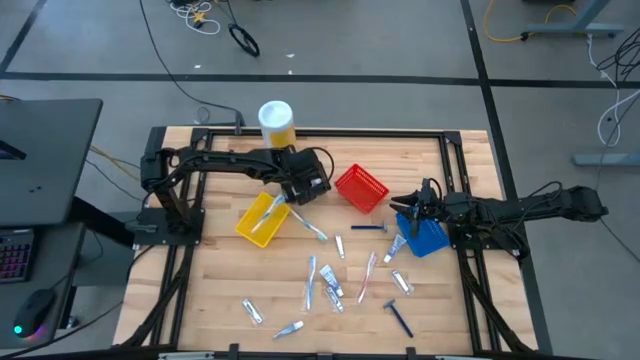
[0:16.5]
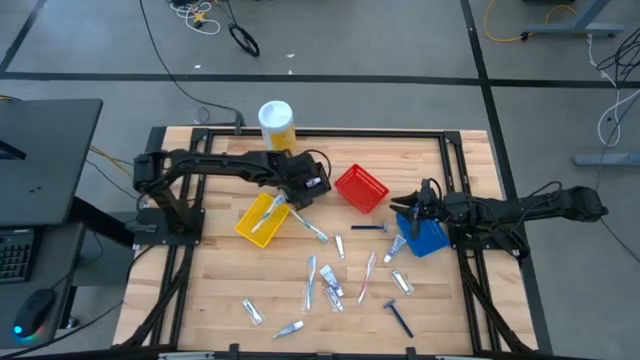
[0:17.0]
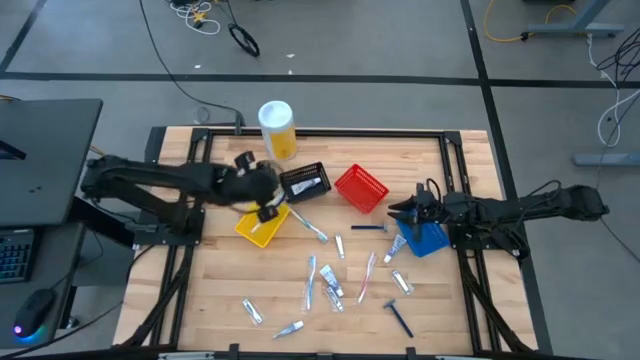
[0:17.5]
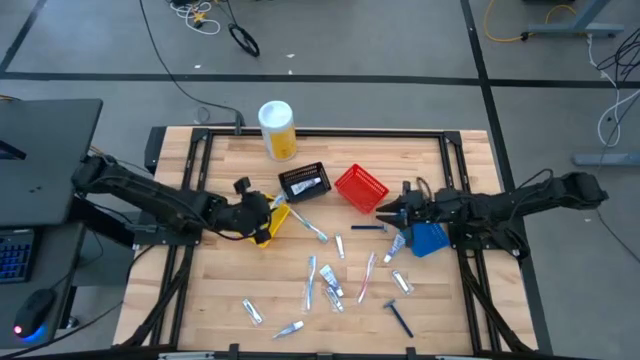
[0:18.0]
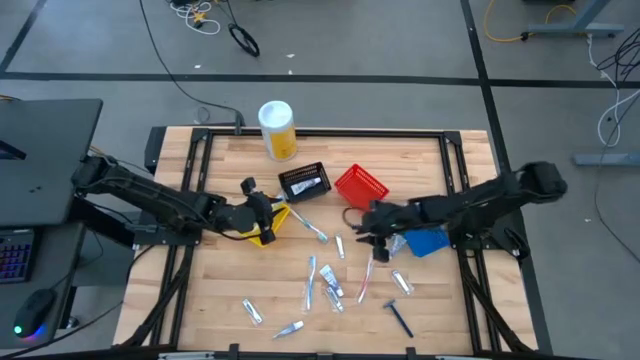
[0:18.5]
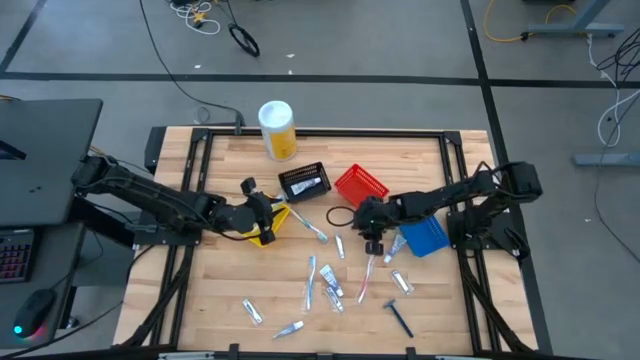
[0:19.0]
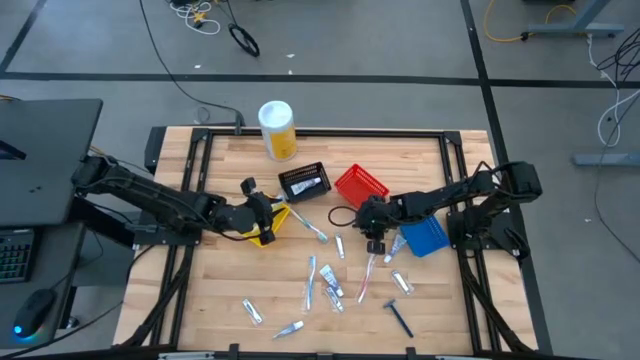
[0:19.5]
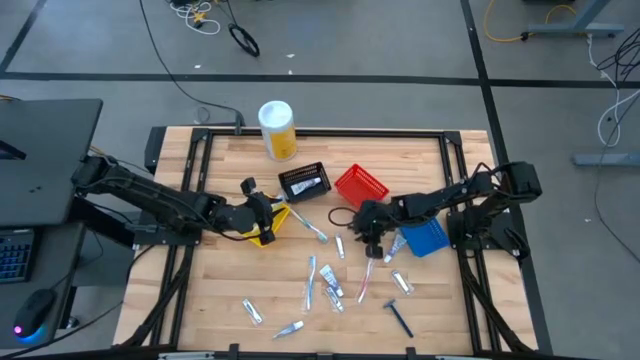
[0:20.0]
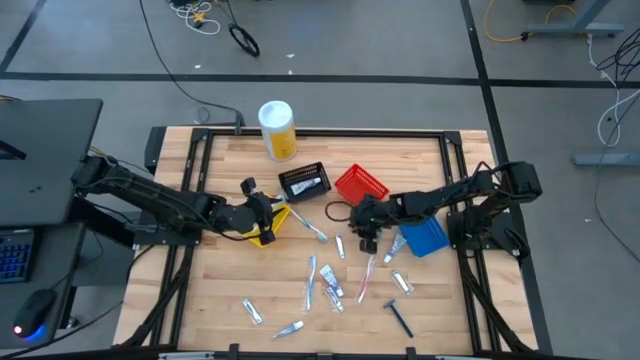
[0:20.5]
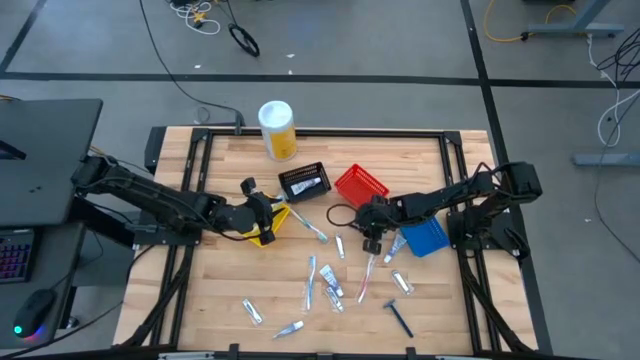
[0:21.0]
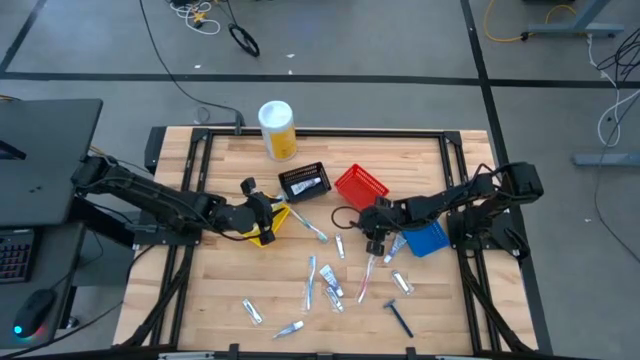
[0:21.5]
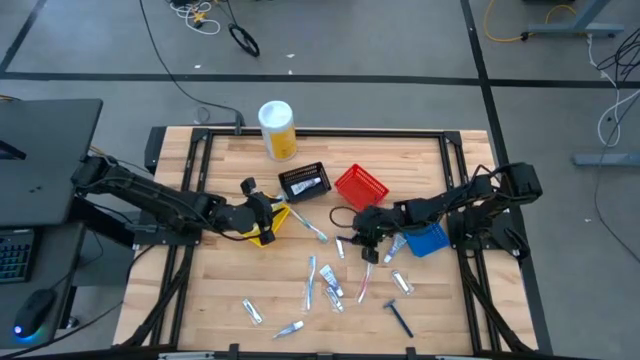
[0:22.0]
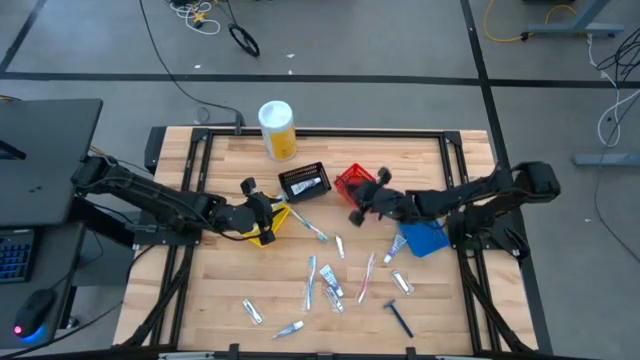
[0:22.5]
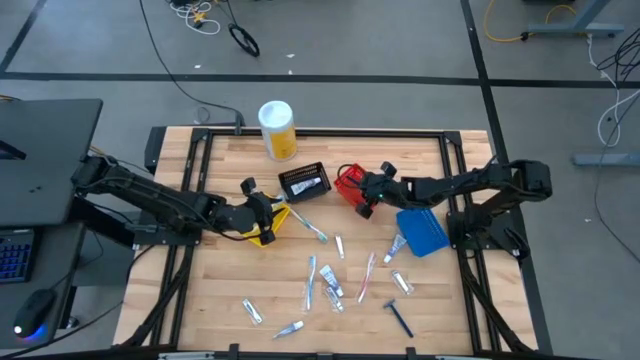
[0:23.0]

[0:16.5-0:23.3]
Task: Pick & Place Travel size toiletries
Put the blue razor into the red basket

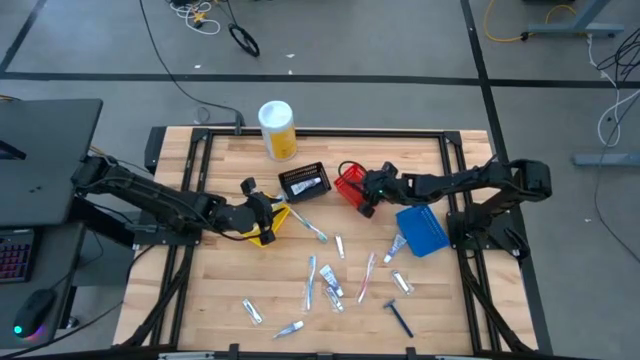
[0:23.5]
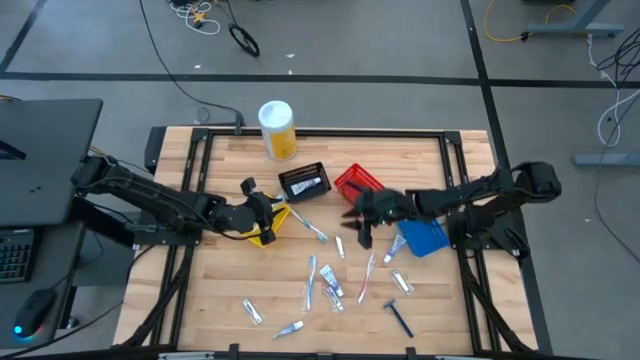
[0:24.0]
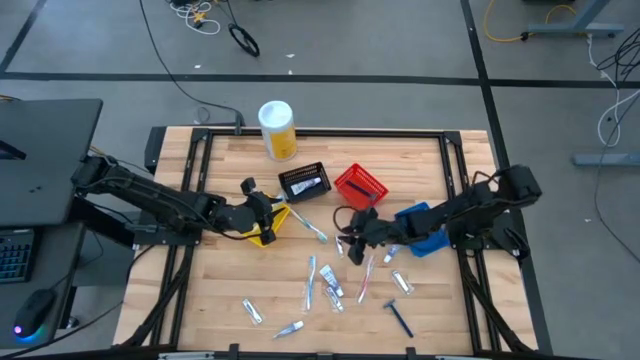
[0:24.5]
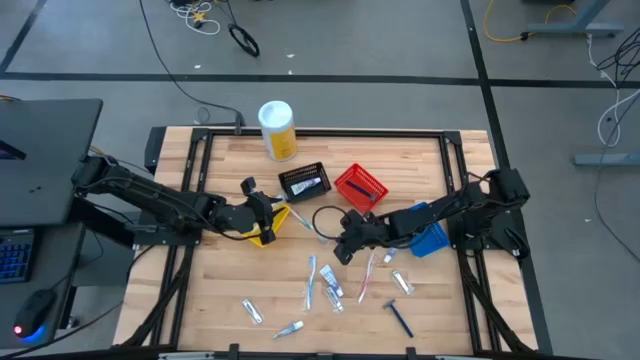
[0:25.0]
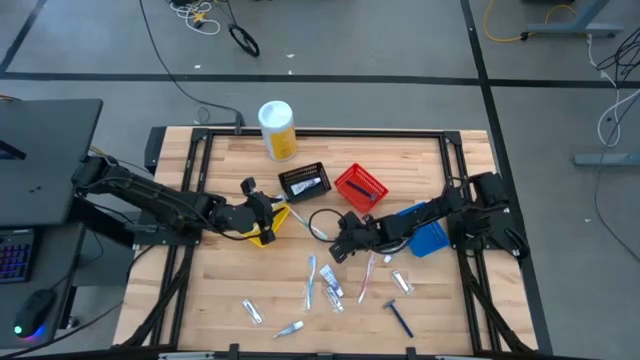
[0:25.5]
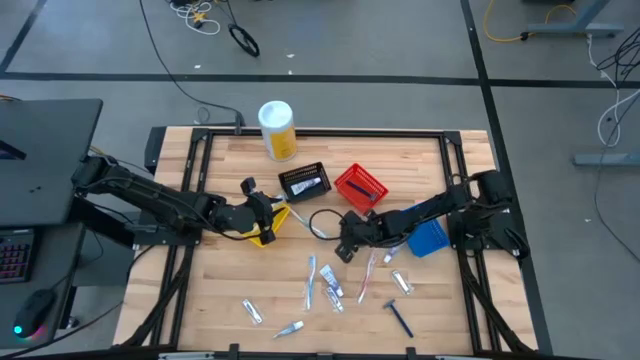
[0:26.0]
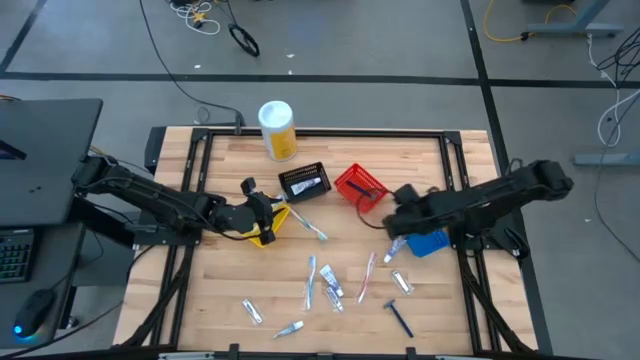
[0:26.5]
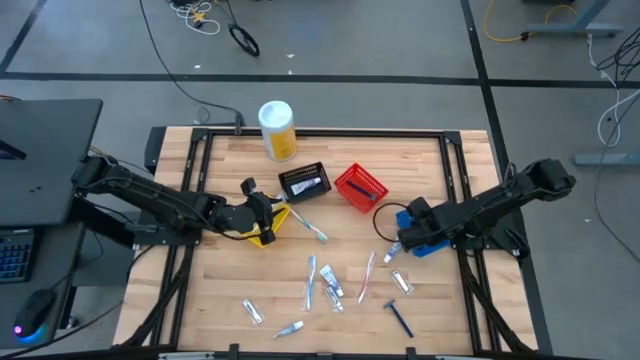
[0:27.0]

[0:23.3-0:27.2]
Put the silver nail cutter into the blue basket

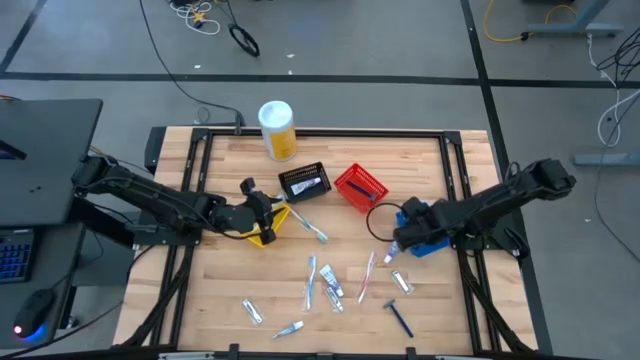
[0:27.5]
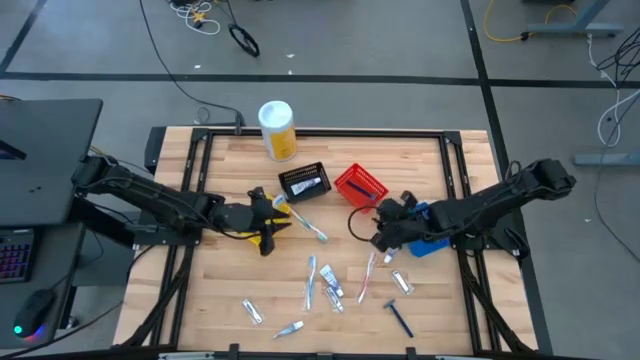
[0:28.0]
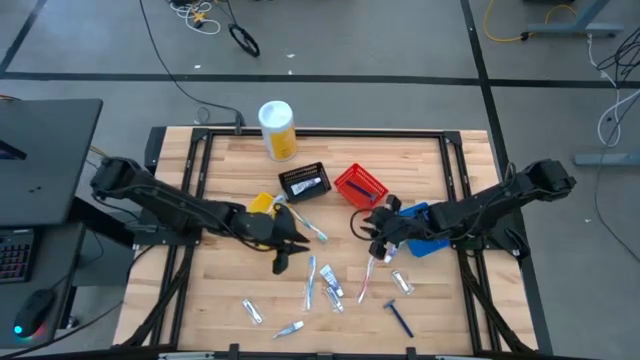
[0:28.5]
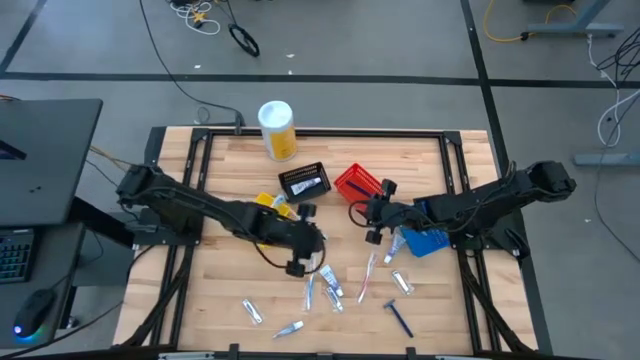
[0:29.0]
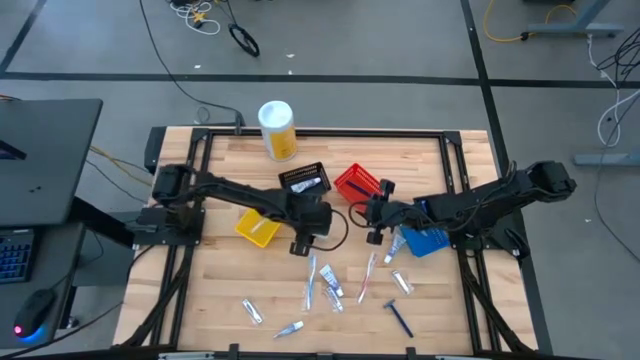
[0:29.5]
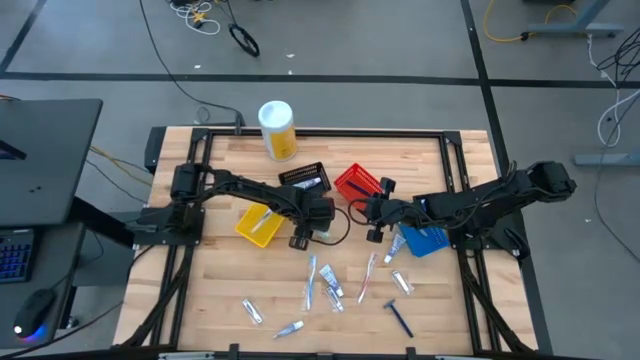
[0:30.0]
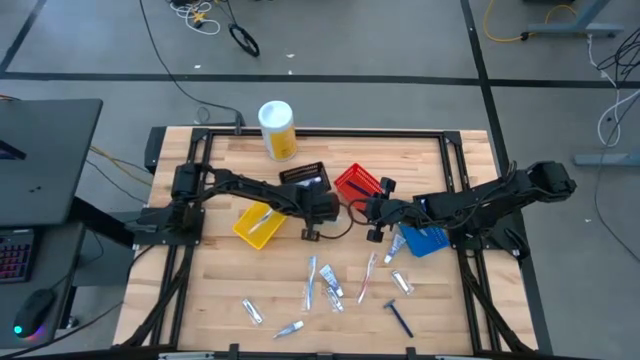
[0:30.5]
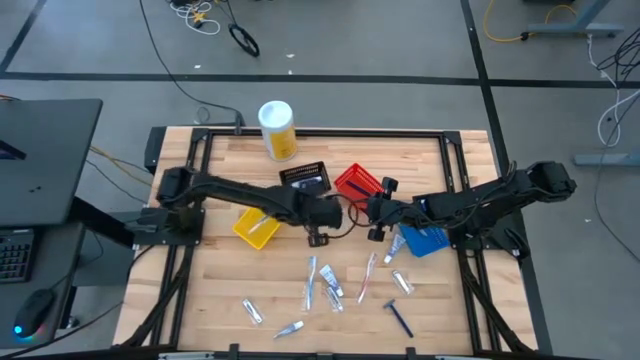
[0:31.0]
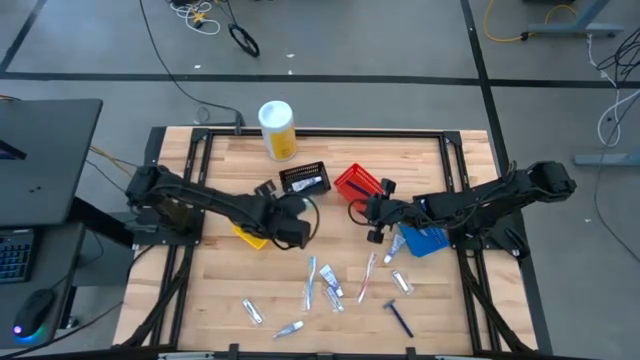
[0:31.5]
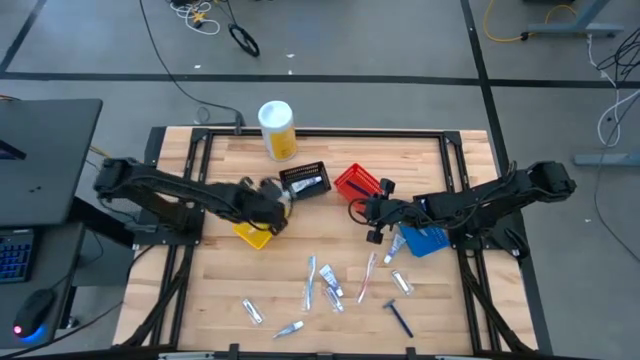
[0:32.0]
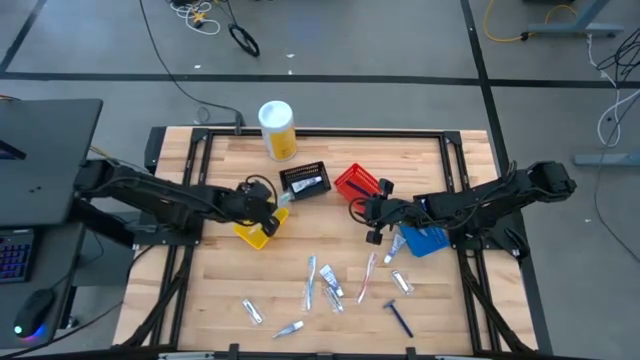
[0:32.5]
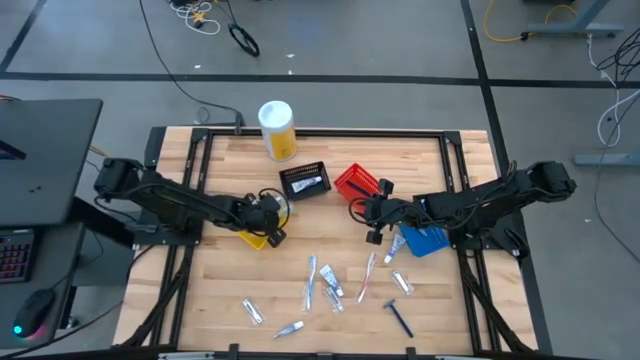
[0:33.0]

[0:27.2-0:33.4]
Put the green toothbrush into the yellow basket

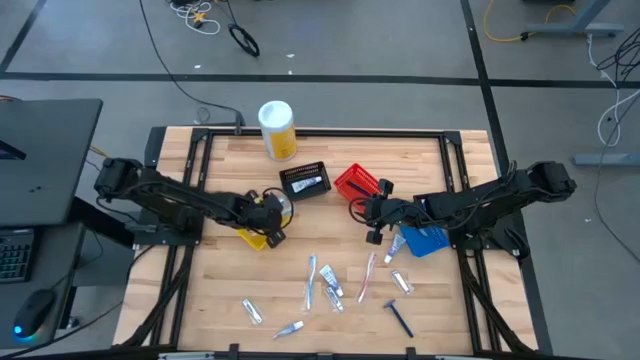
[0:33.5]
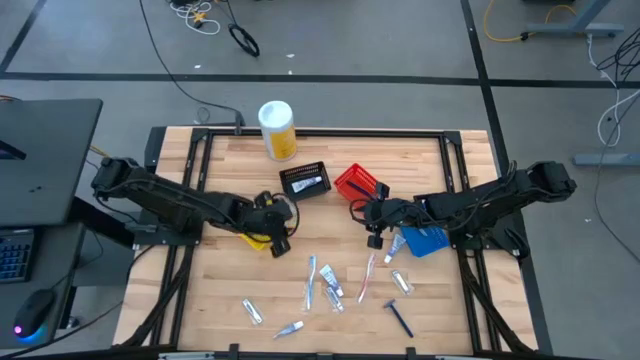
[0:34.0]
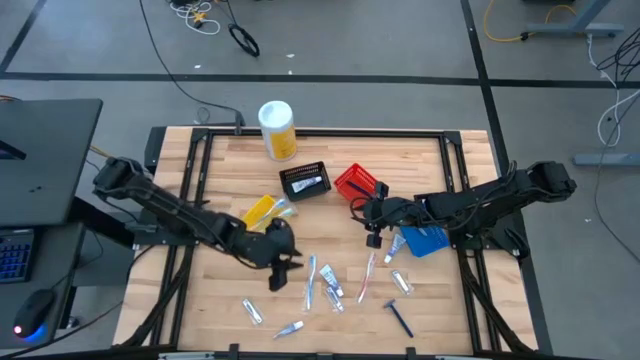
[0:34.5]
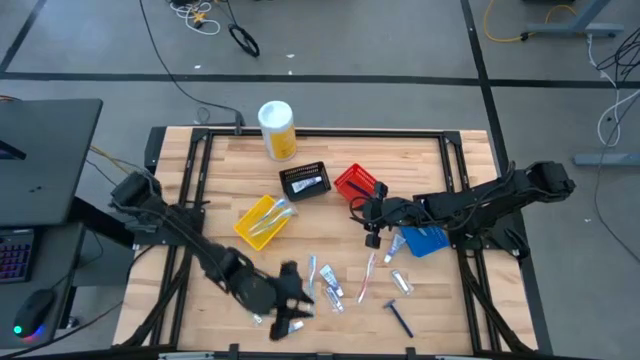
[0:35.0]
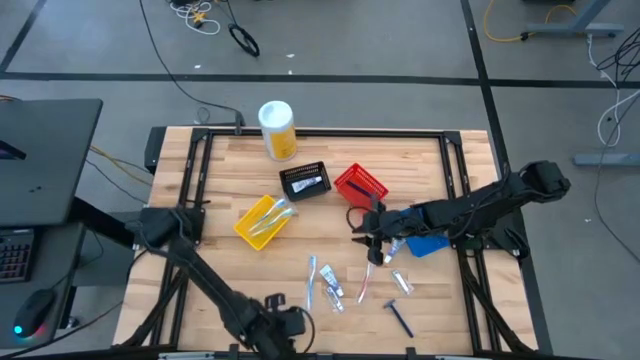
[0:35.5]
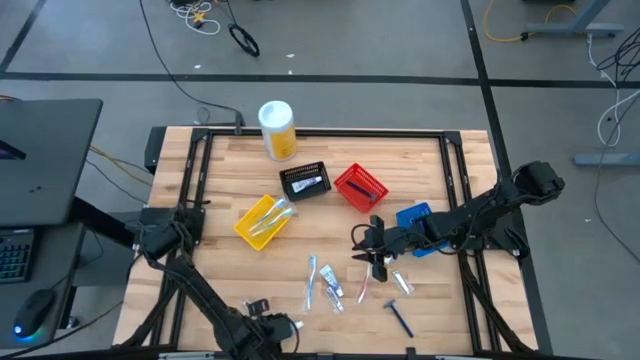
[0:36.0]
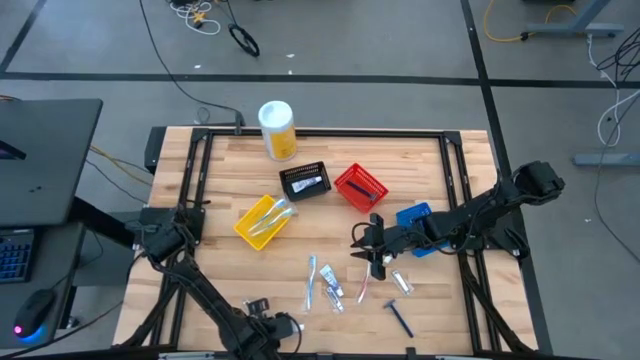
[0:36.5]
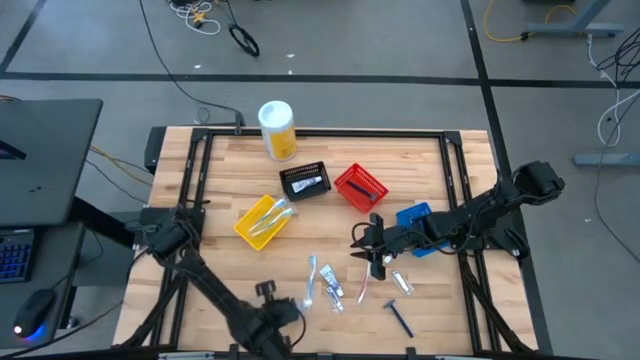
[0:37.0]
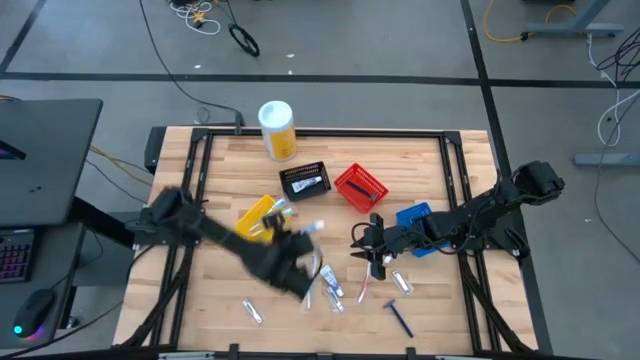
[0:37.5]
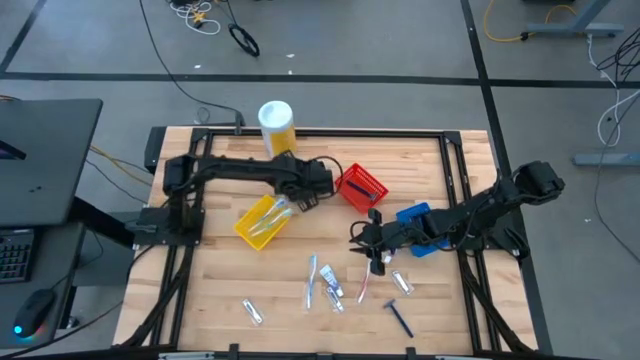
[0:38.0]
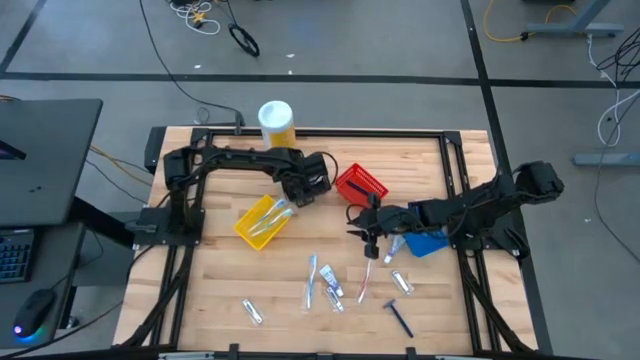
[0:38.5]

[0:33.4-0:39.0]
Put the white toothpaste into the black basket
